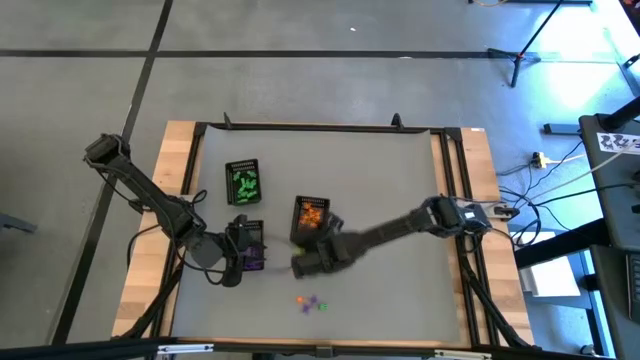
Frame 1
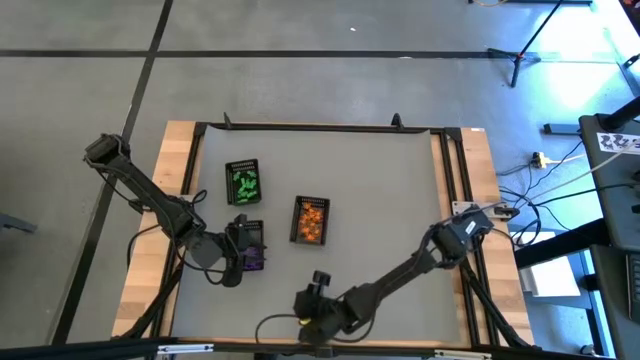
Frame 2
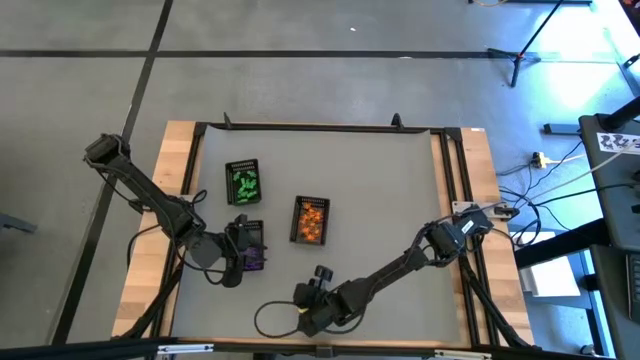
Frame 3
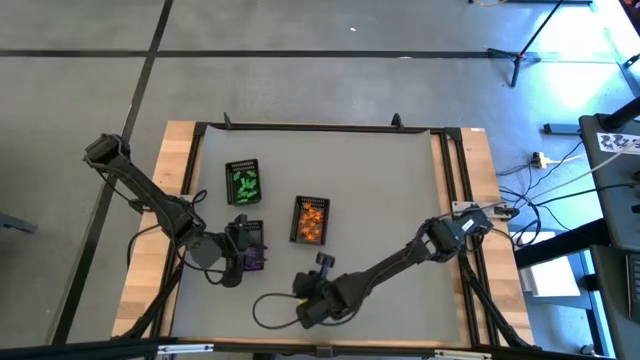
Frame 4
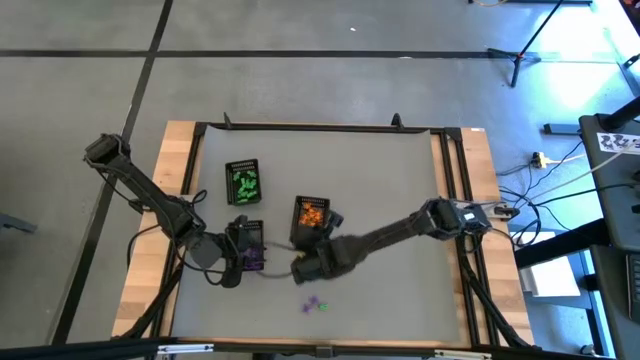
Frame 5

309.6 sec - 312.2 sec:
Task: Sort Halloween decoration
Put the orange spider toy into the bottom right black basket

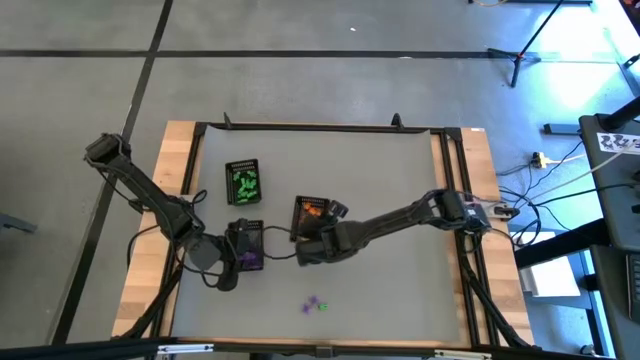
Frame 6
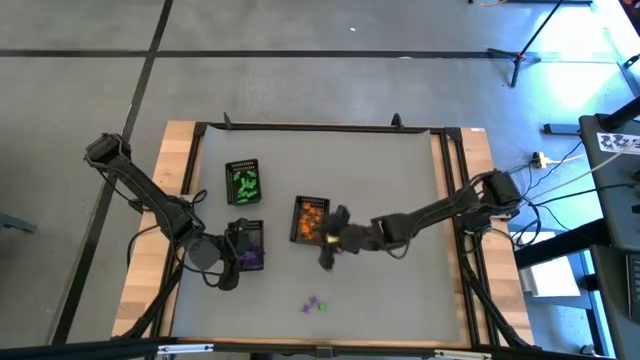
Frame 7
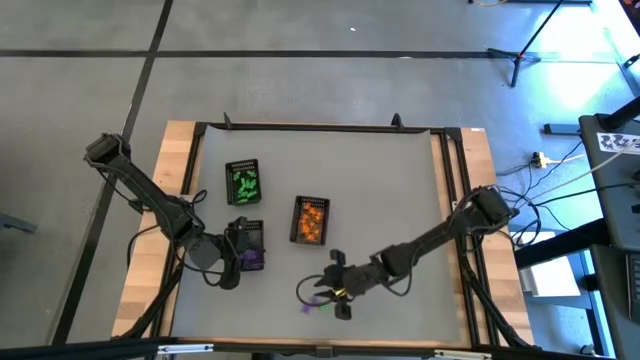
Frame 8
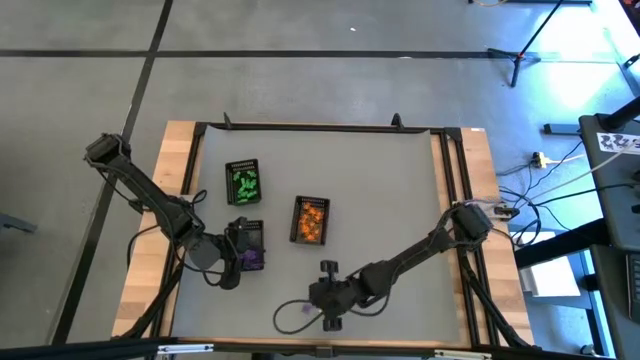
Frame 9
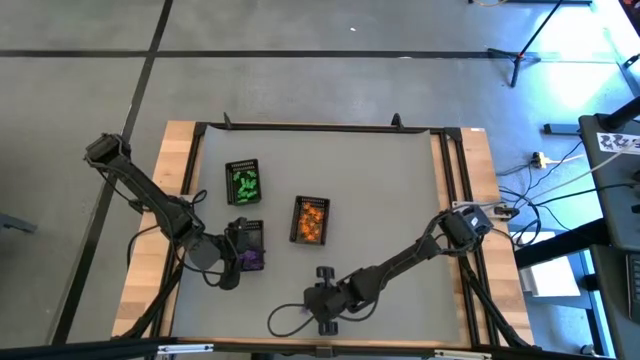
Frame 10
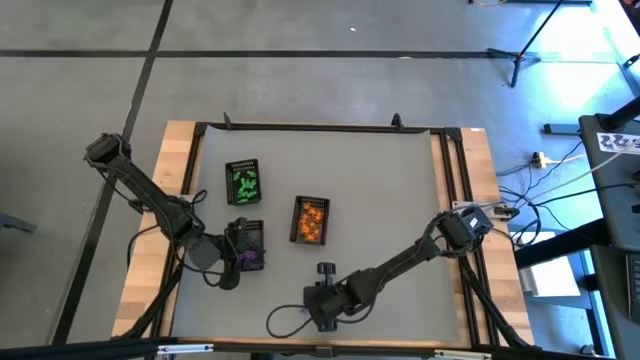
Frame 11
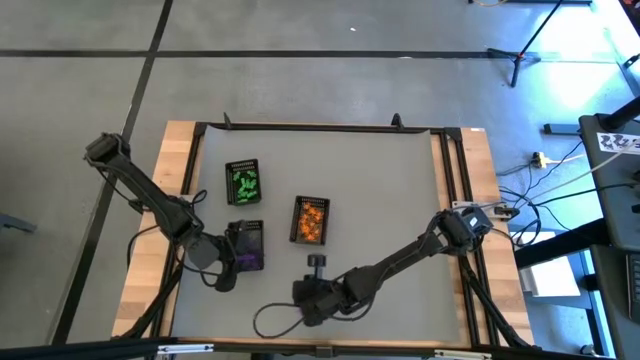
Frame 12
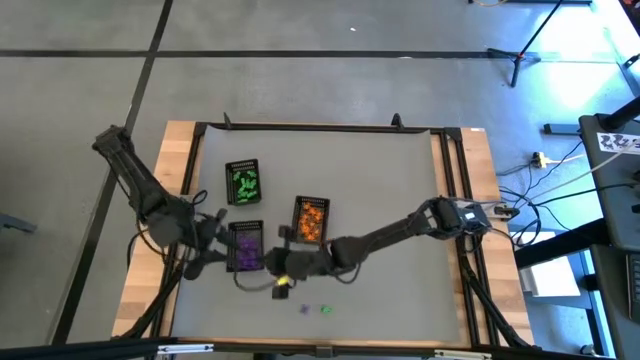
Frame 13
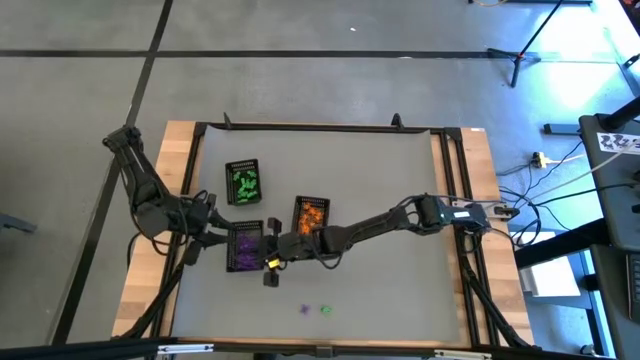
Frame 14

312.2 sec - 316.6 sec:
Put the purple spider toy into the bottom left black basket

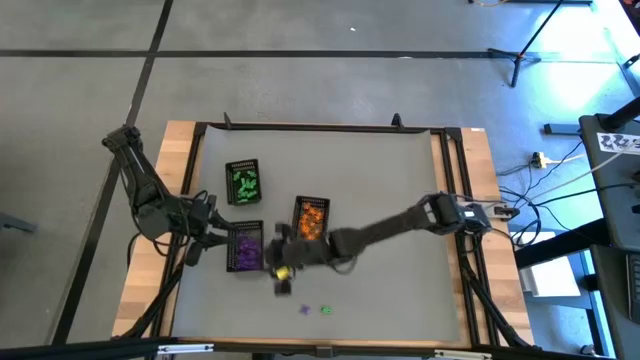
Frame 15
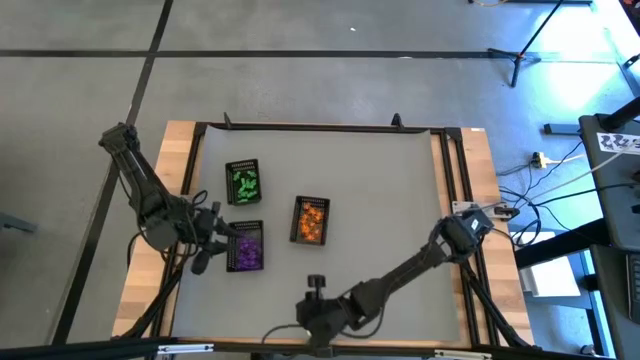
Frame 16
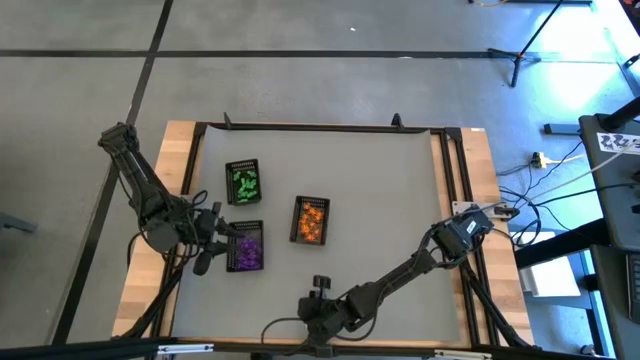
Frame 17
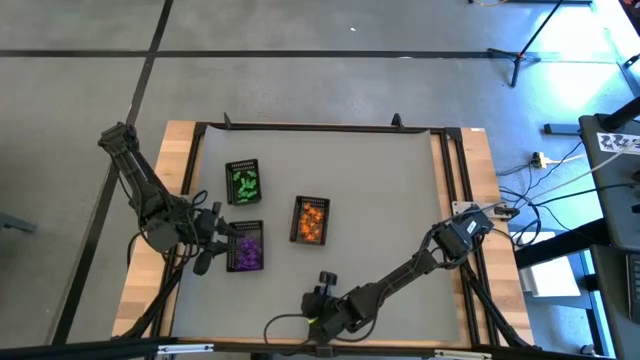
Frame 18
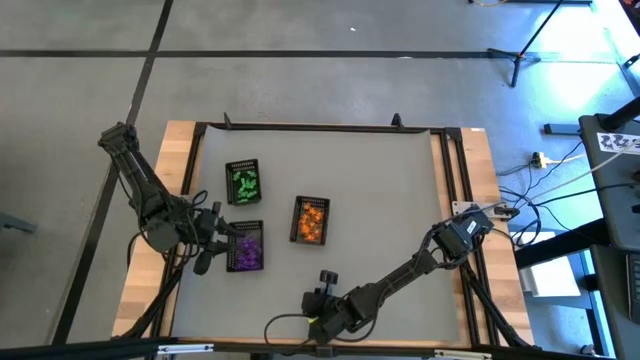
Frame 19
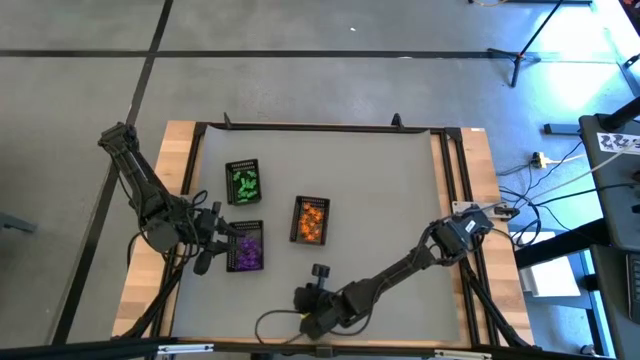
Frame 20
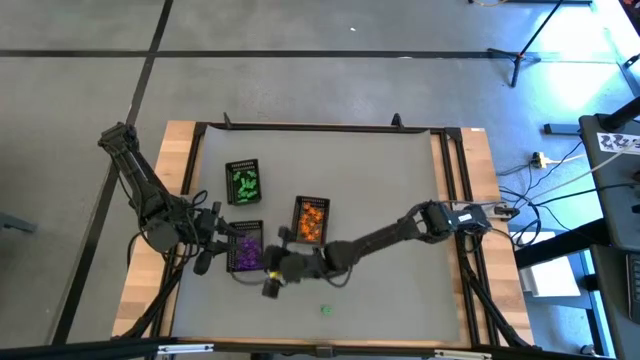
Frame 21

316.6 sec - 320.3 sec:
Put the purple spider toy into the bottom left black basket

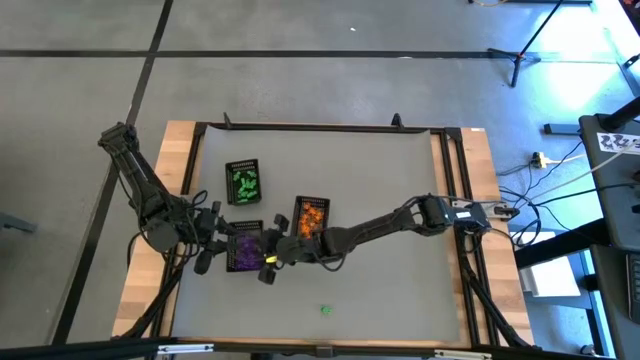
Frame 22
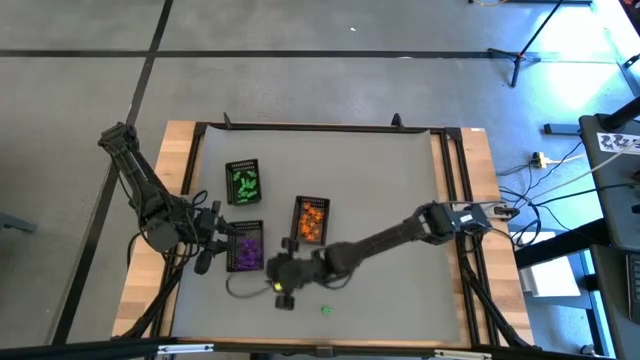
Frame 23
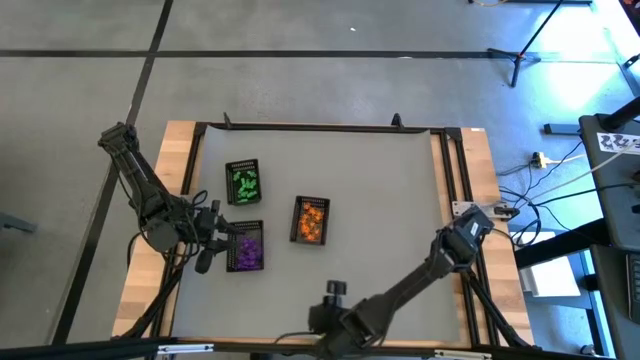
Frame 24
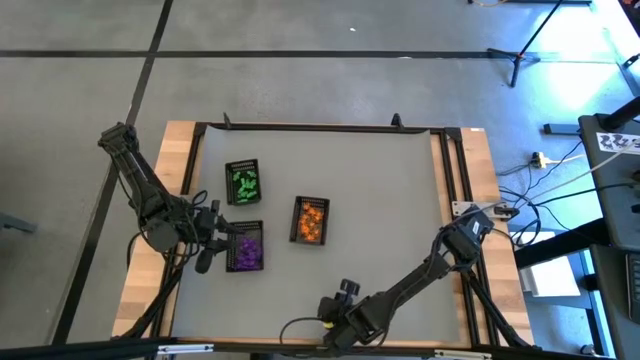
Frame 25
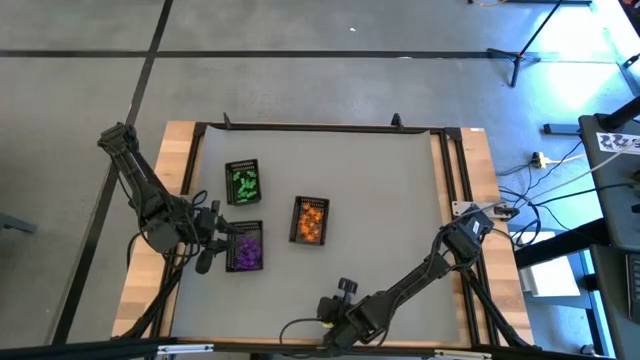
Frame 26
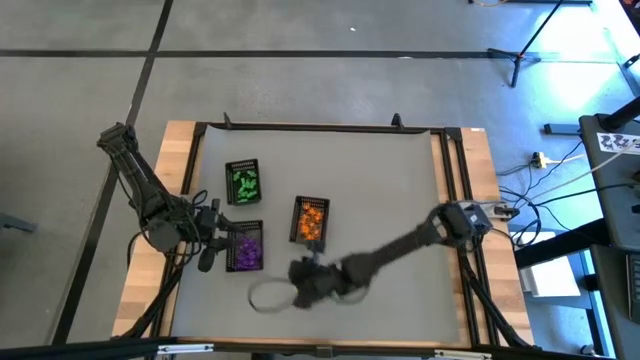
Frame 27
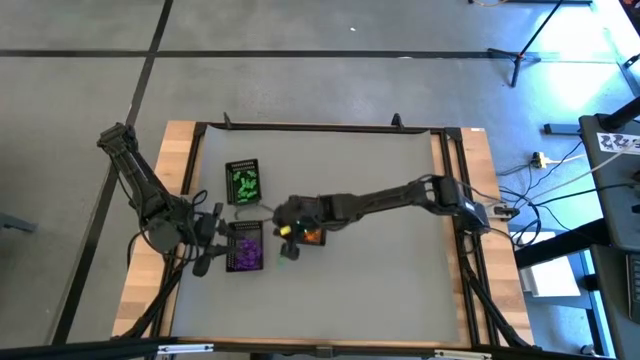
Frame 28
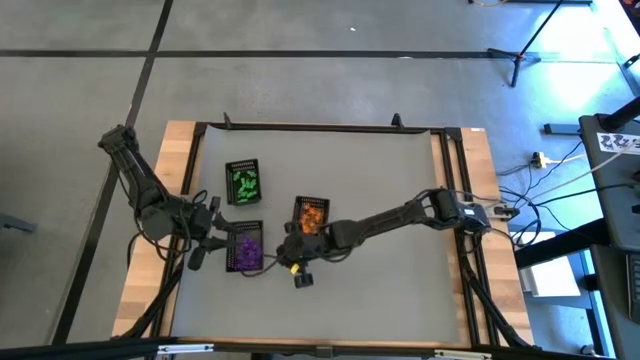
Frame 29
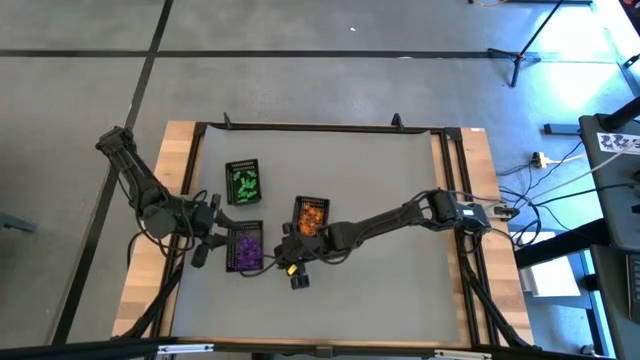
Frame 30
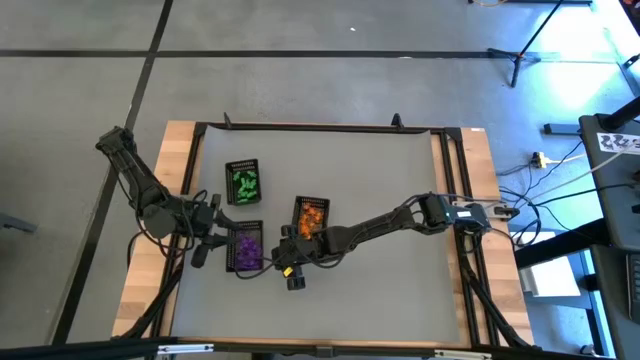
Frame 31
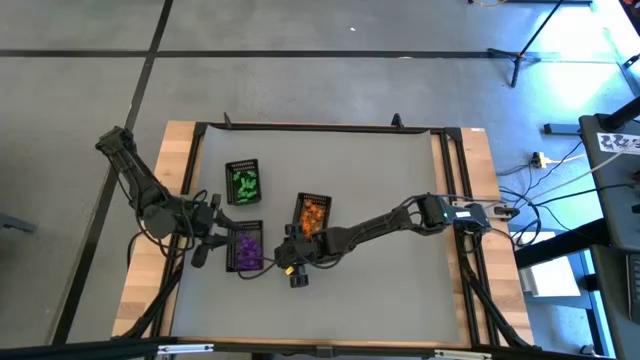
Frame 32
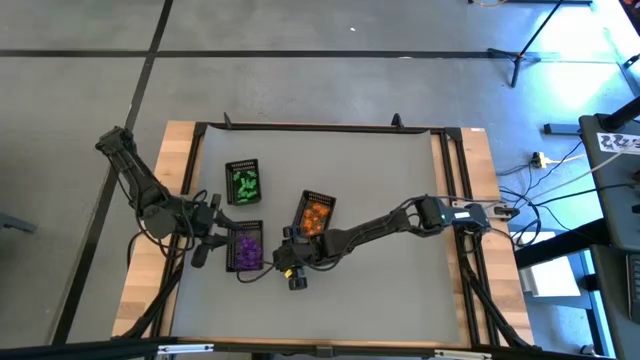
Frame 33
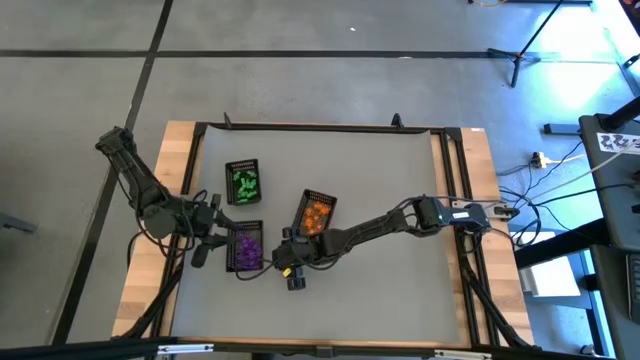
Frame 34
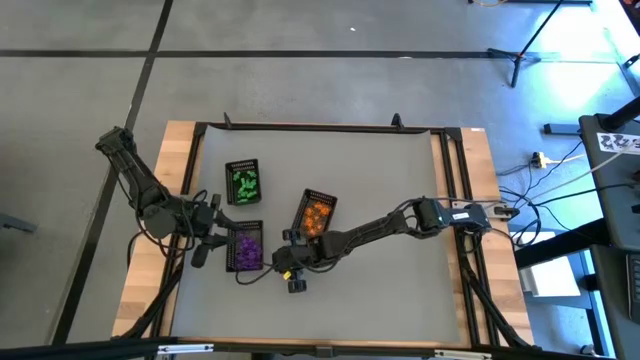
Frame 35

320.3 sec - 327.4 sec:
Put the green alien toy into the top left black basket

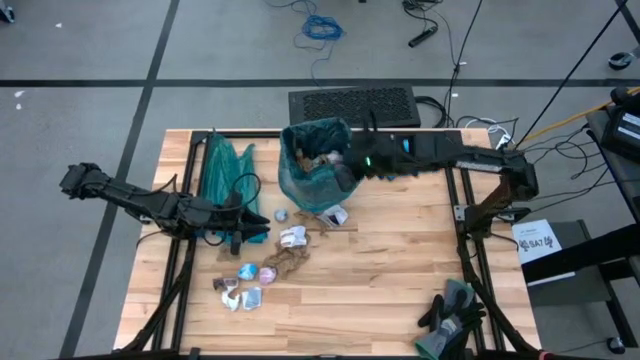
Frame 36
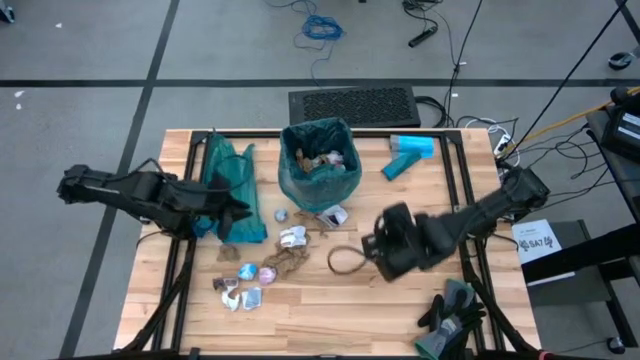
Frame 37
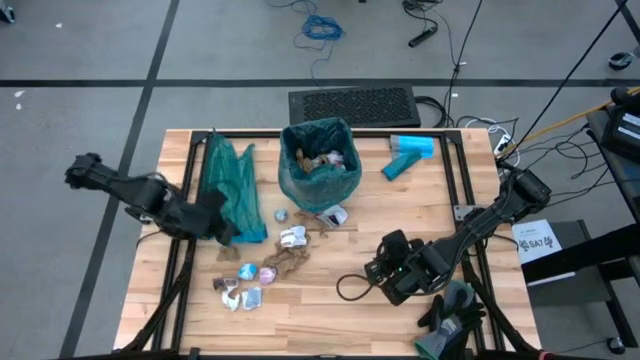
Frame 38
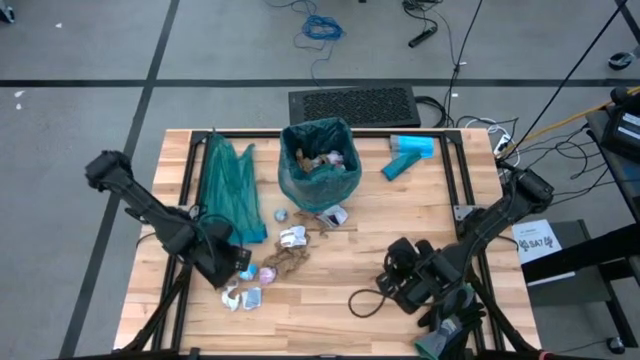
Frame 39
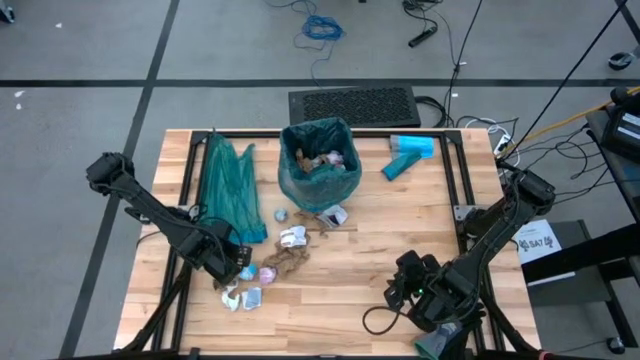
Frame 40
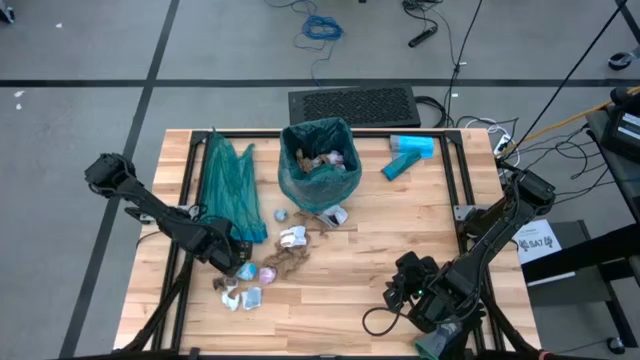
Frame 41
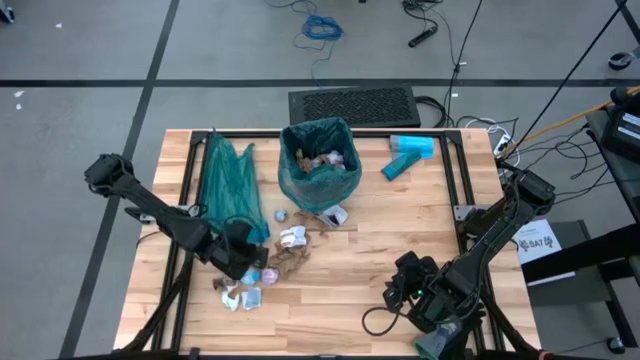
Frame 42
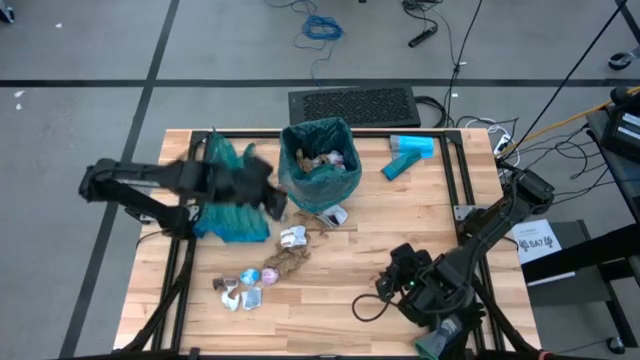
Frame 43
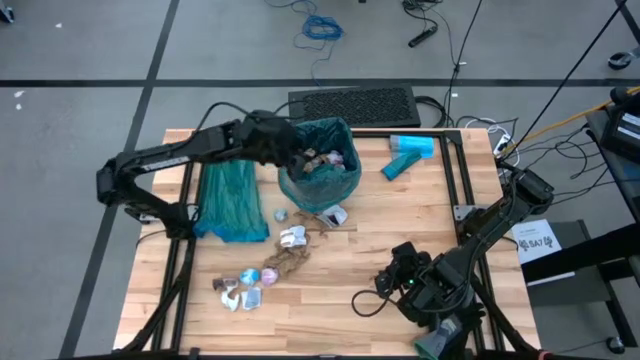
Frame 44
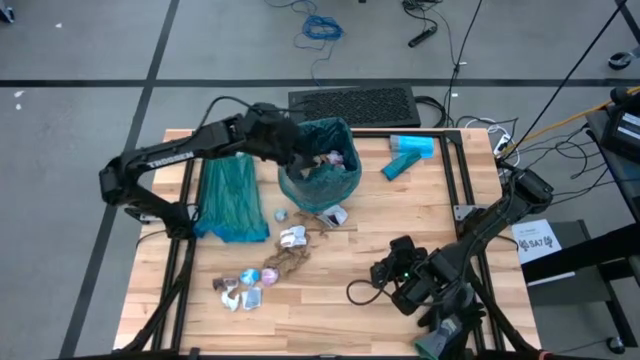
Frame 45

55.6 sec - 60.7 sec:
Task: place trash/remove bag and relplace
Put the brown napkin into the blue trash bag inside the black trash bin
